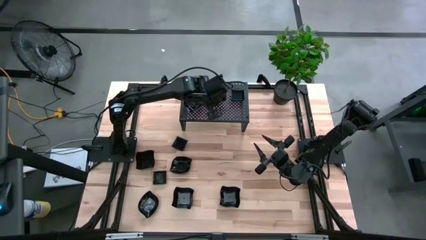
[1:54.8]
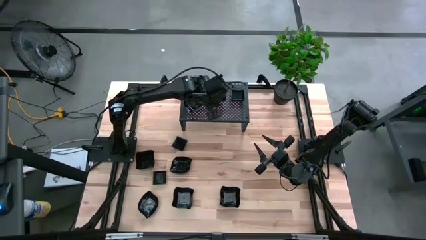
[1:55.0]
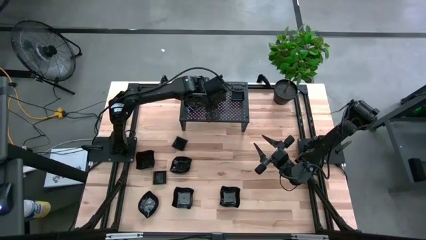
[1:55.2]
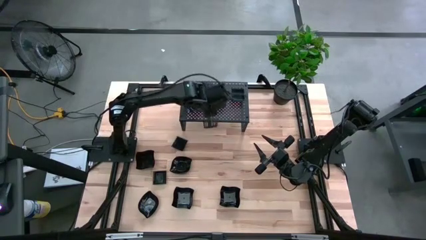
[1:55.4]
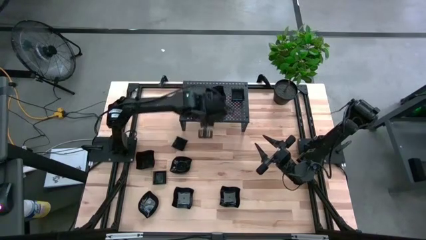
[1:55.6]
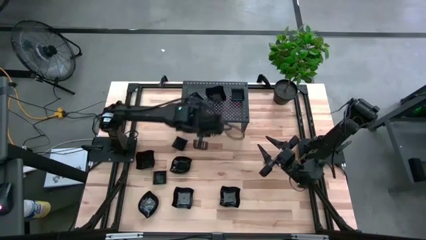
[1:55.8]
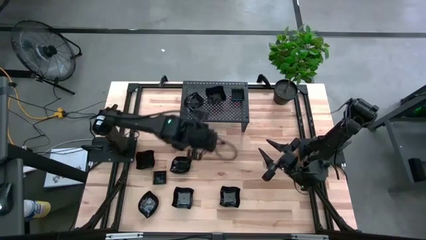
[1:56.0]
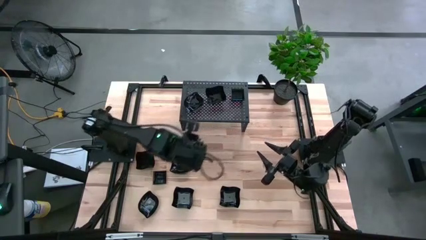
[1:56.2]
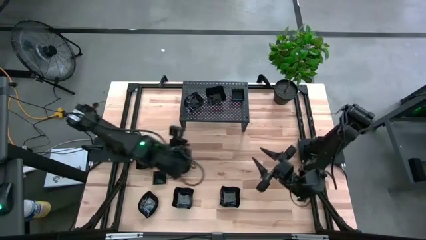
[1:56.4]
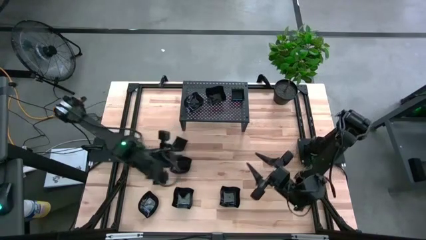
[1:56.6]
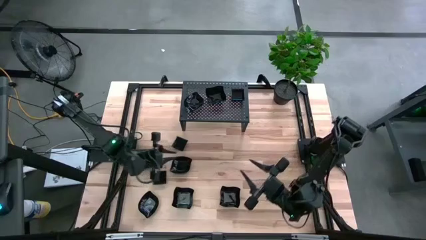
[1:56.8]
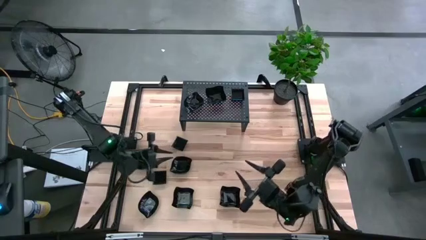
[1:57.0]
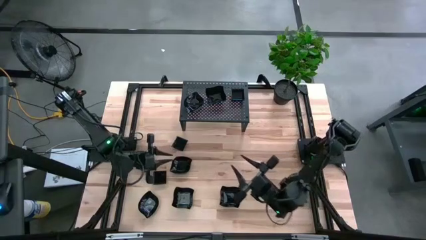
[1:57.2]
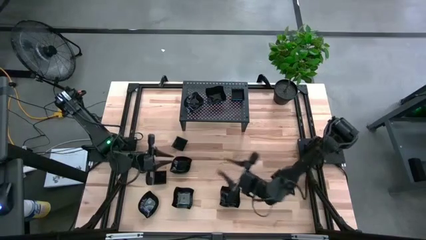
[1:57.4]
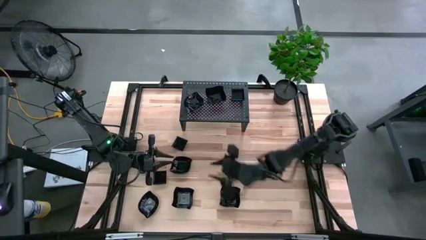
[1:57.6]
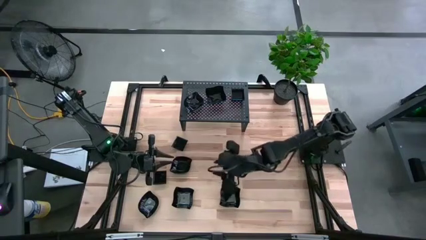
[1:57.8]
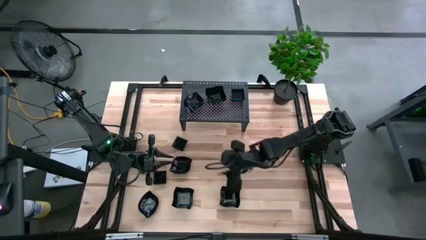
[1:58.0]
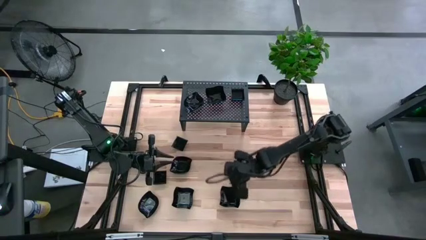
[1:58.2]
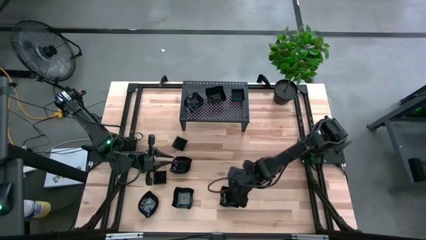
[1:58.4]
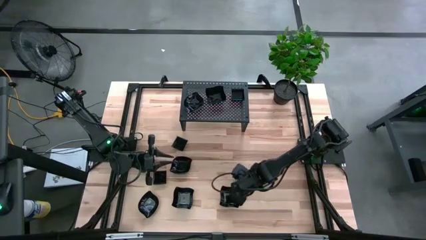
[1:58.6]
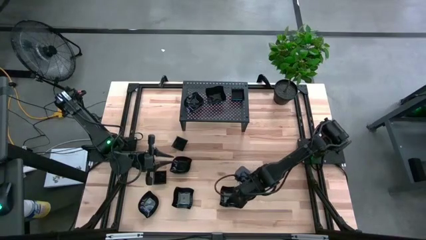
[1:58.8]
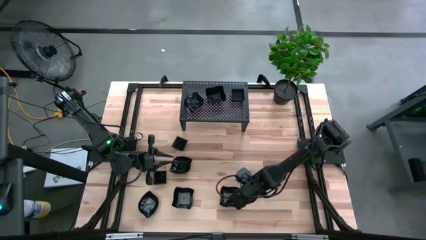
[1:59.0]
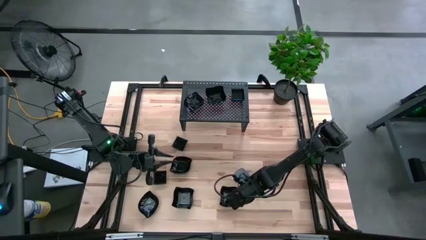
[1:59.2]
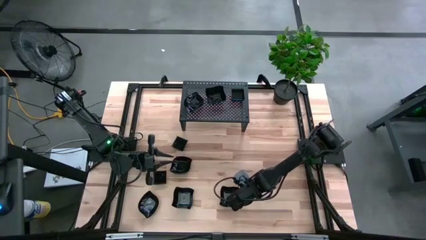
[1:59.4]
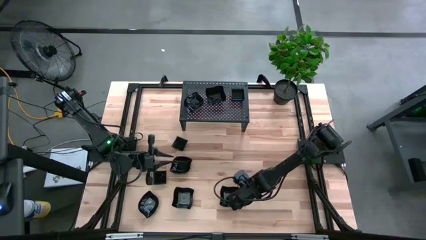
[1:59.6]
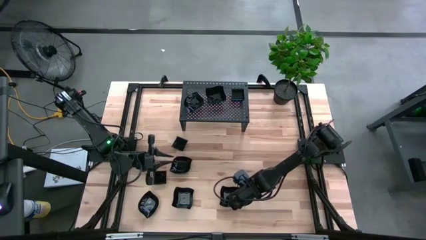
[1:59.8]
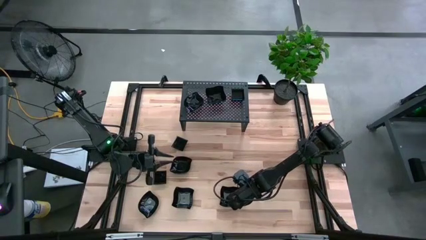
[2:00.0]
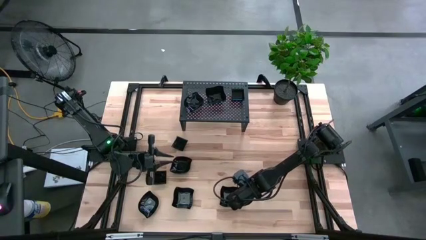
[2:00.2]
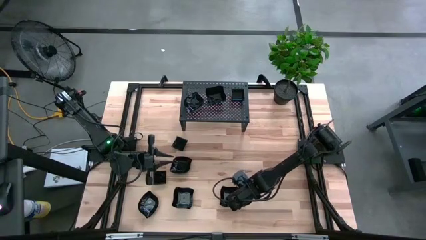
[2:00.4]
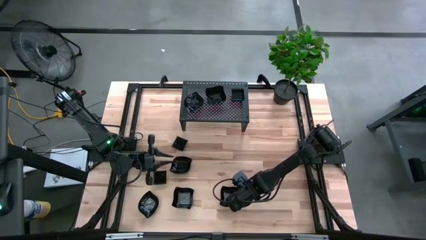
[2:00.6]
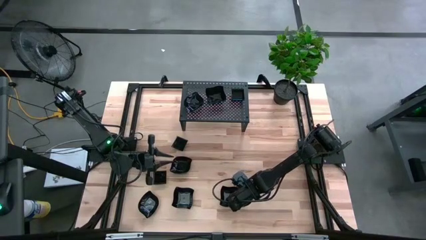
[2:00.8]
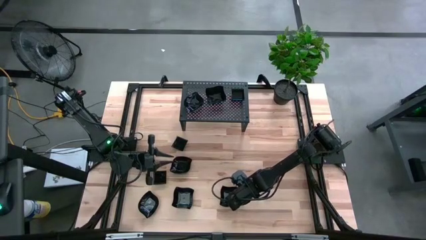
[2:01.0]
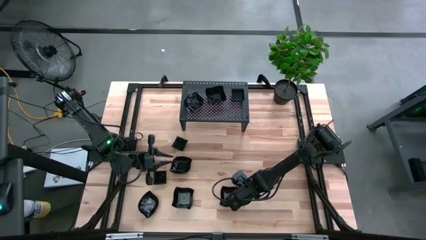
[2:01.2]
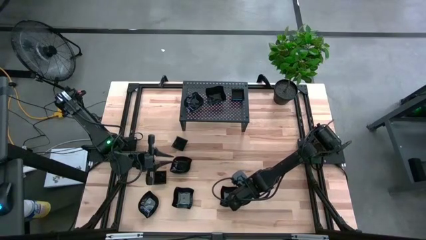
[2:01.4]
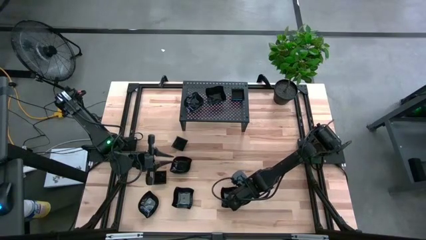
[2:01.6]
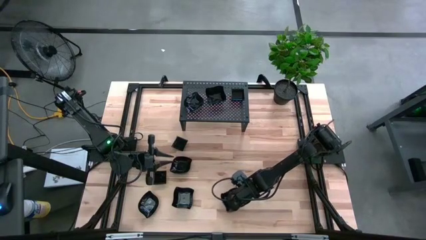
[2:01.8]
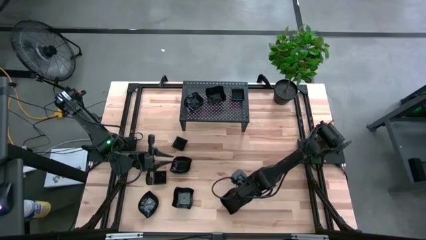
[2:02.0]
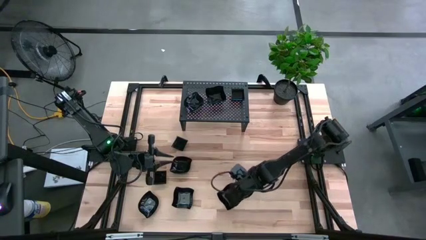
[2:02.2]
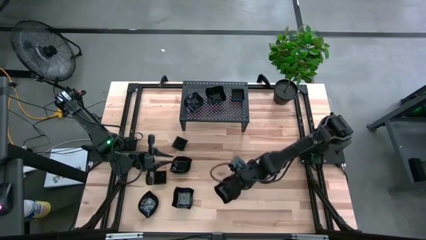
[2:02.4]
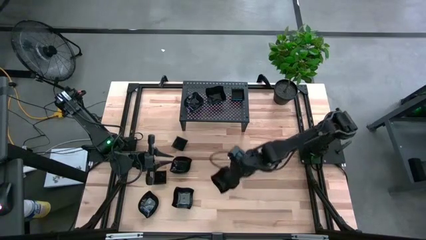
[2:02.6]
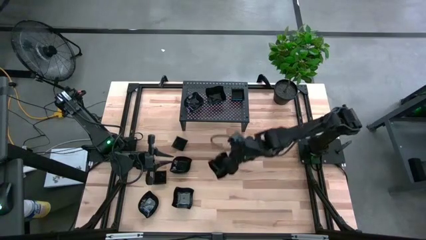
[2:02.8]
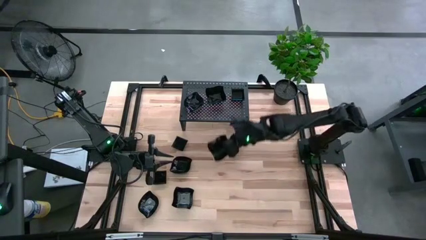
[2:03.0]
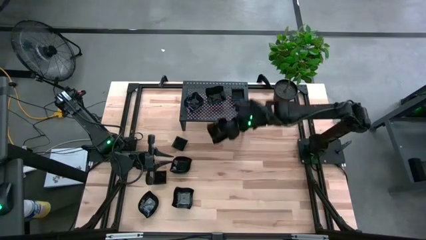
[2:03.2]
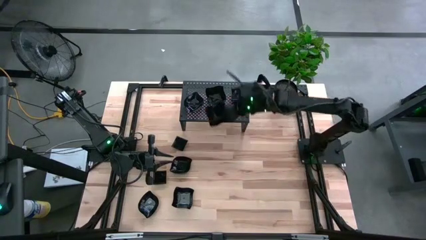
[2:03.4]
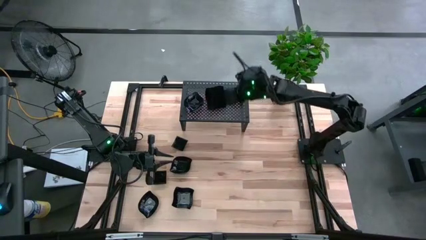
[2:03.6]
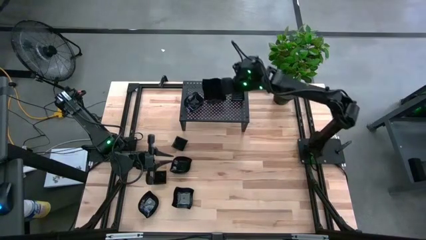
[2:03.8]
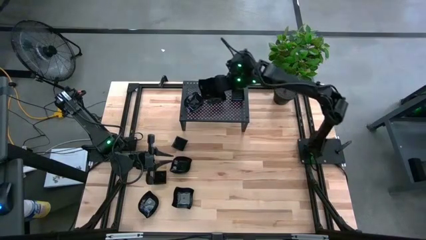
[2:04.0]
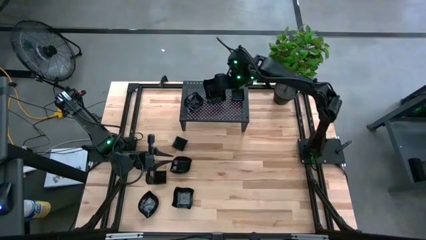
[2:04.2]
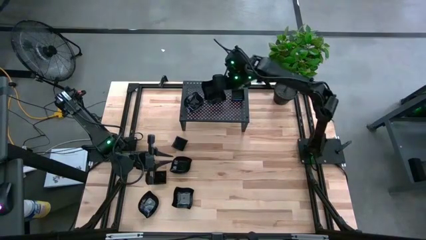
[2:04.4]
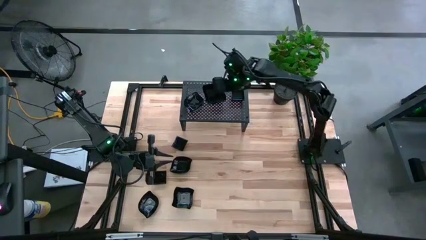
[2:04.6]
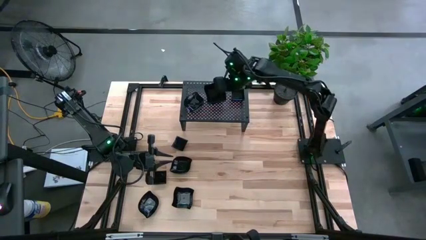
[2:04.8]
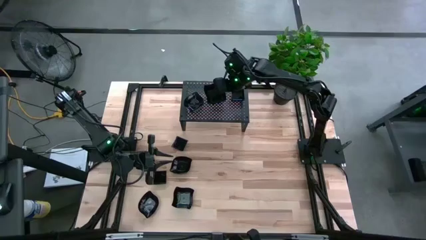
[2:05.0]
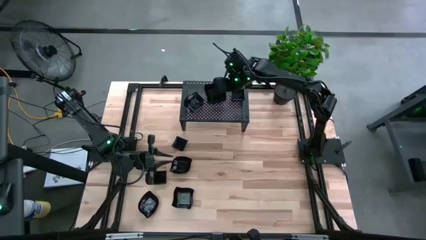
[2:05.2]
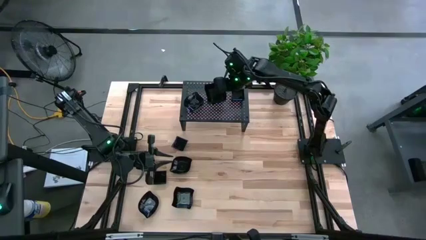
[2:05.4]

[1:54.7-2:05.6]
Task: Pick & Place Mini shaped plates
Stack the distorted square plate on top of the distorted square plate on the shelf

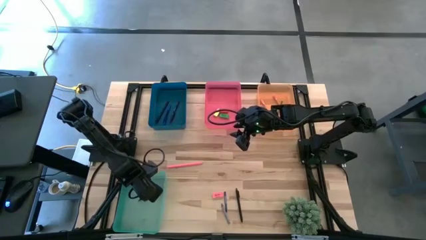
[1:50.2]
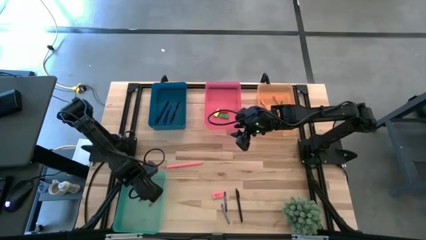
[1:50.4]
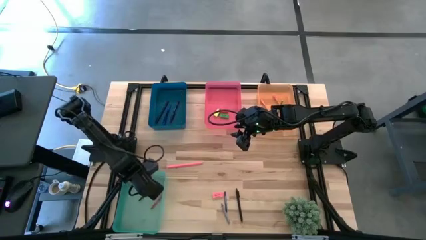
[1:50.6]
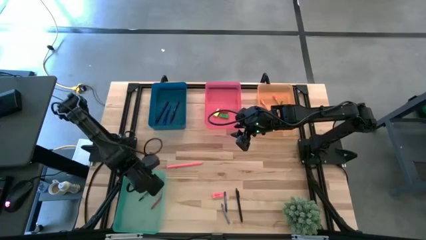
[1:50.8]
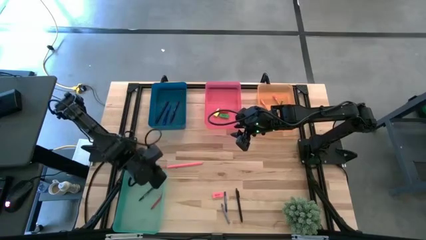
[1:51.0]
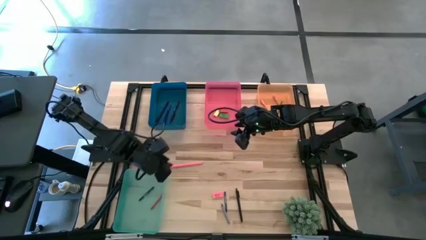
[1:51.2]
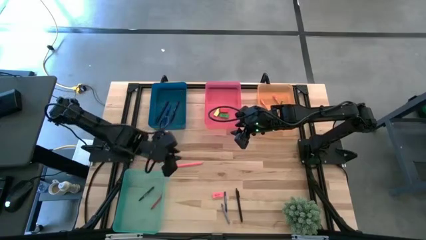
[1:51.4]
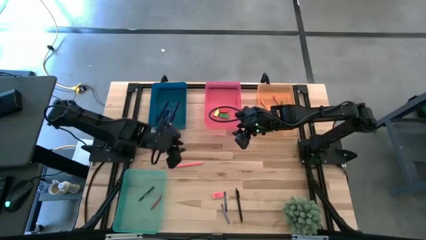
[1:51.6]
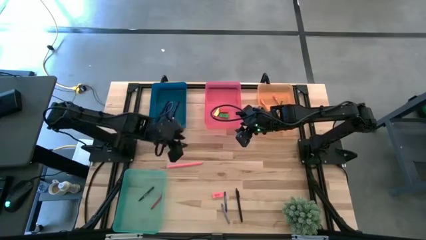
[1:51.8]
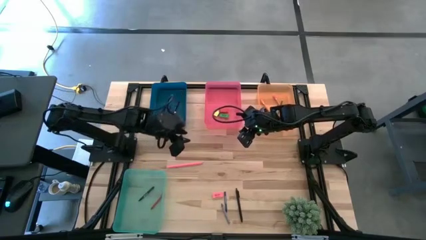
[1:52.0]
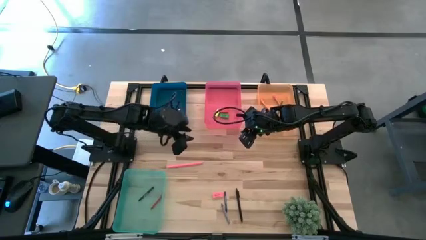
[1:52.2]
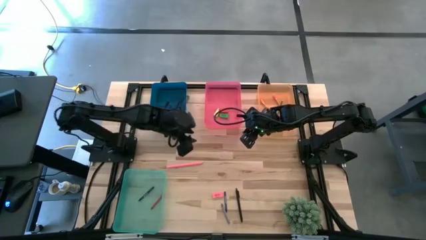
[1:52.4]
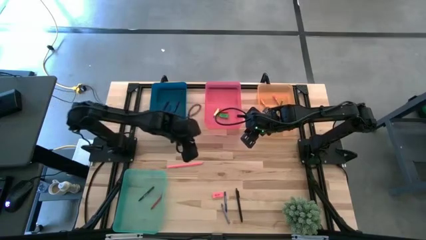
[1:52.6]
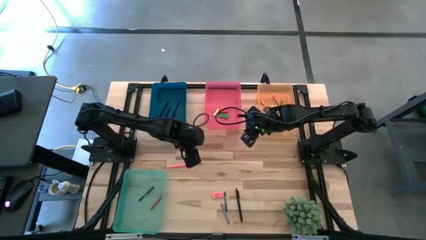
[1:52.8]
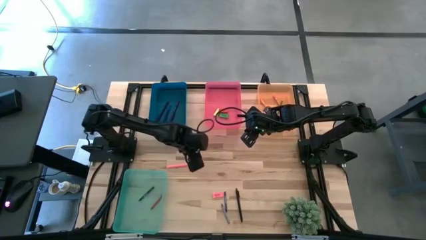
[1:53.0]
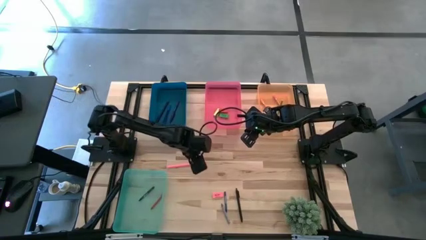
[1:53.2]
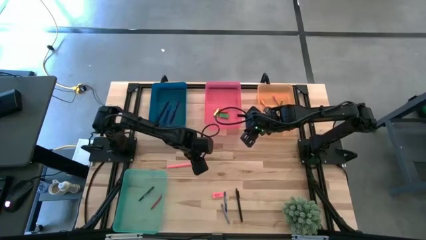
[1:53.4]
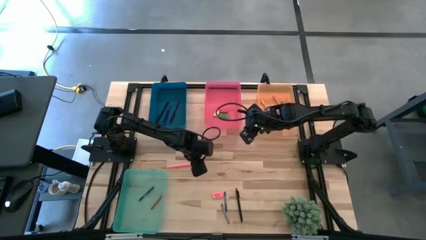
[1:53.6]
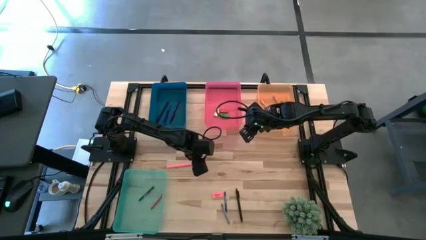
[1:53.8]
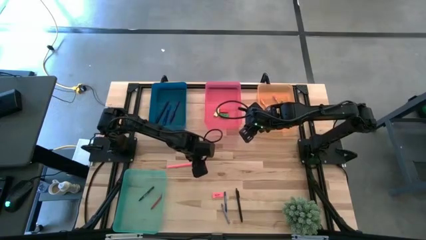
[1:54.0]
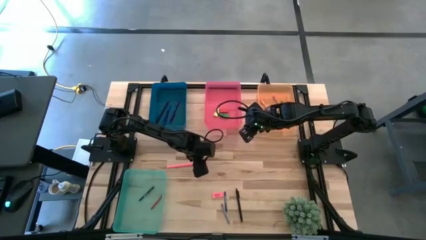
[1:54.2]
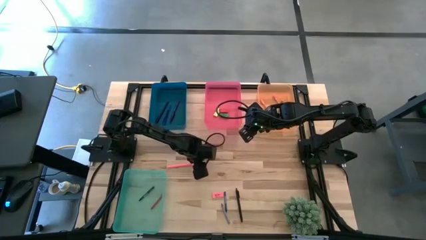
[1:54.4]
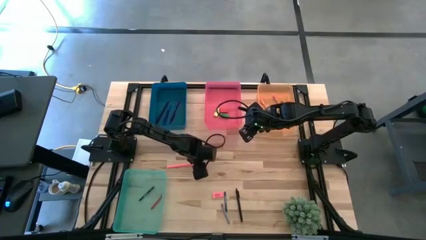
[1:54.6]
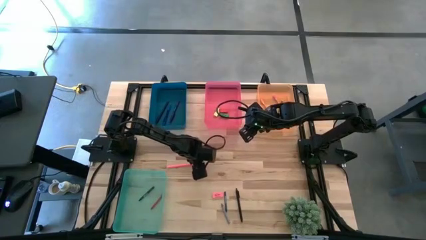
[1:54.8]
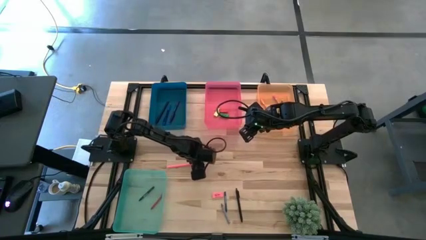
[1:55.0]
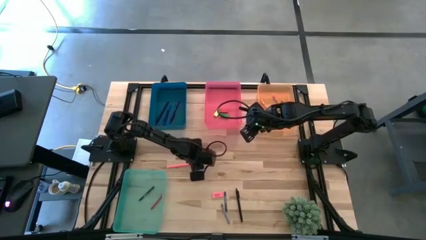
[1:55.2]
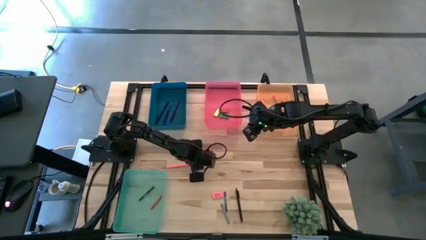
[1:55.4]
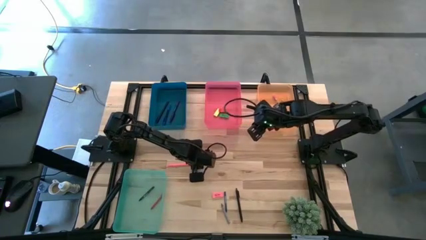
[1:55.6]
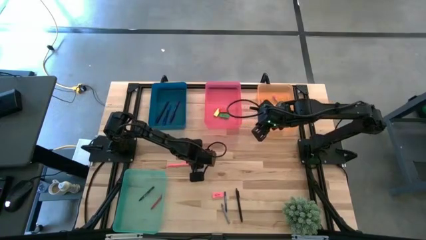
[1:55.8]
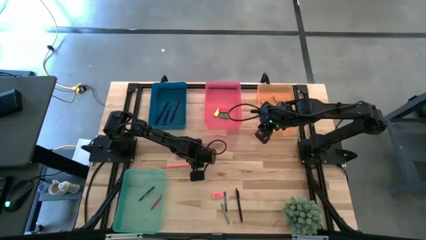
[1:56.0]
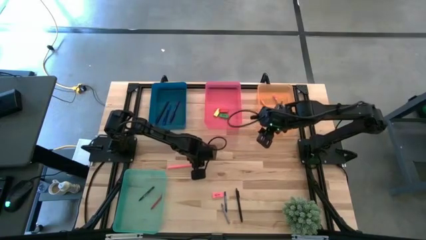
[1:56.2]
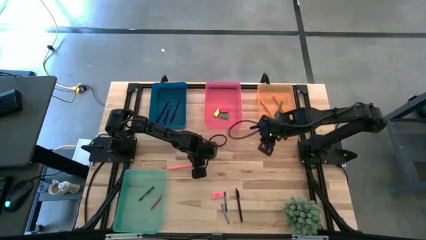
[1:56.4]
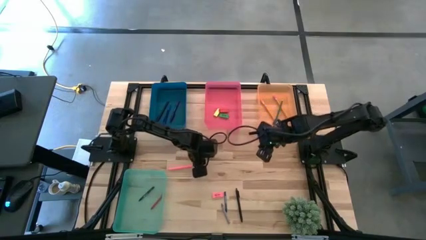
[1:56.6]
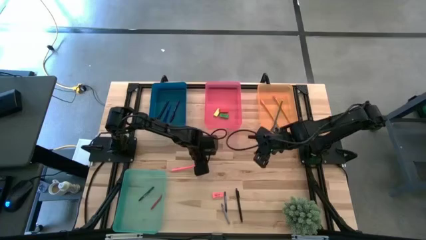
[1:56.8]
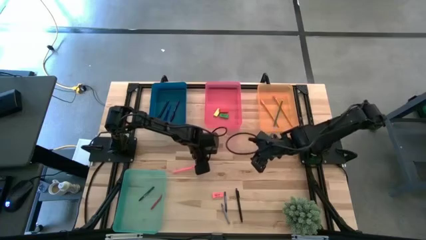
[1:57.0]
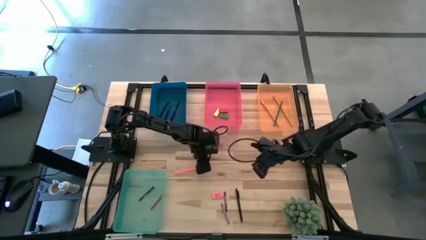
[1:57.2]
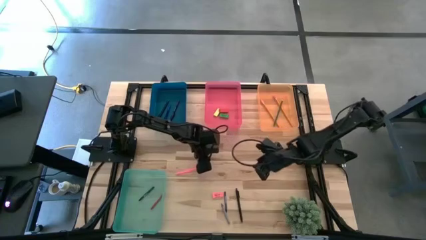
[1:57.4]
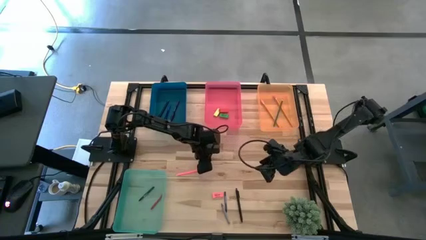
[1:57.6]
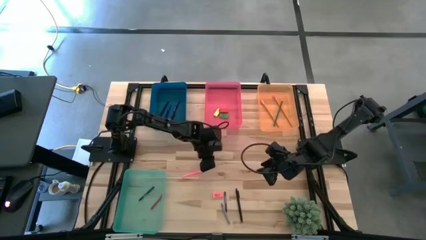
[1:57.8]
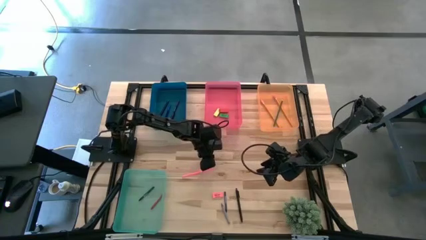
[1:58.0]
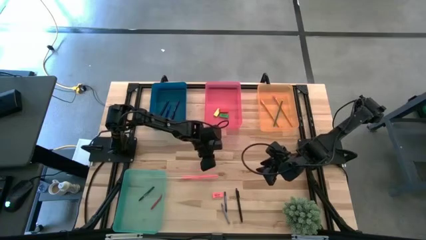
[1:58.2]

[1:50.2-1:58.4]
Task: Sort crayons/erasers/pens/pencils in bins
Put the pink pencil into orange bin
